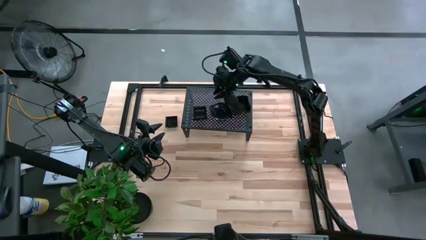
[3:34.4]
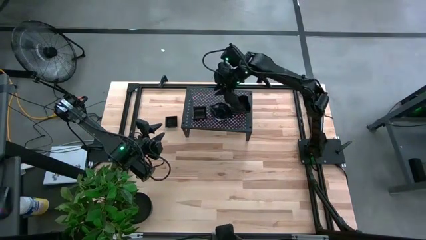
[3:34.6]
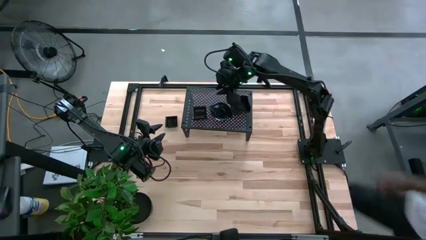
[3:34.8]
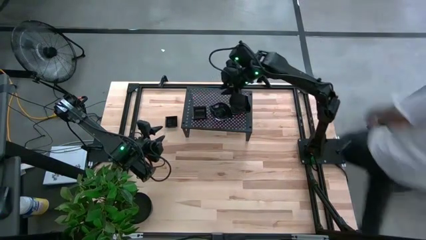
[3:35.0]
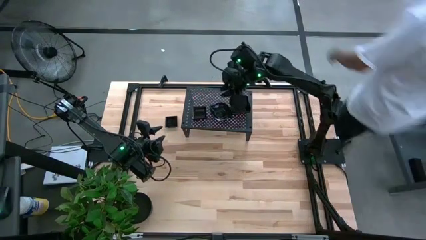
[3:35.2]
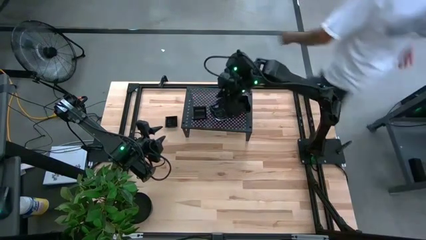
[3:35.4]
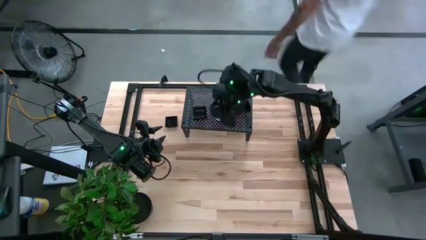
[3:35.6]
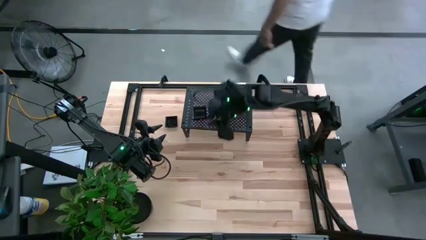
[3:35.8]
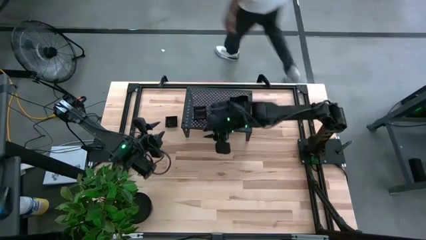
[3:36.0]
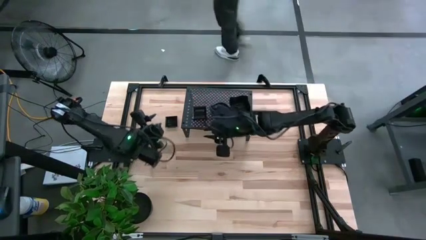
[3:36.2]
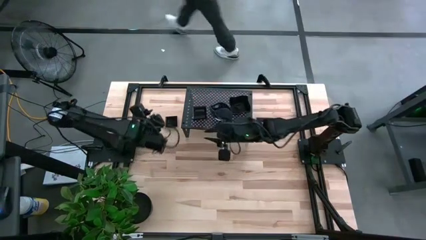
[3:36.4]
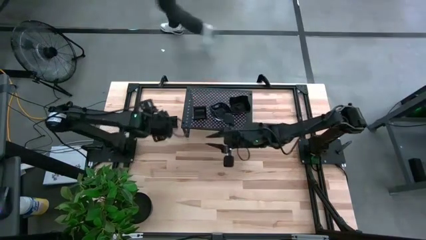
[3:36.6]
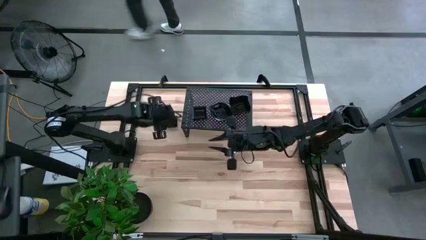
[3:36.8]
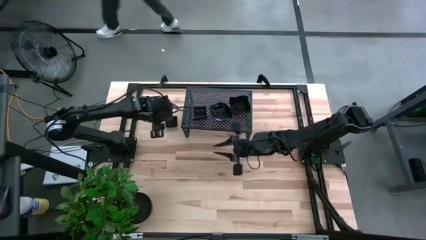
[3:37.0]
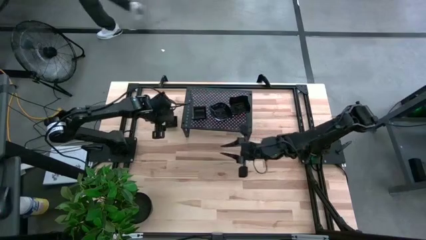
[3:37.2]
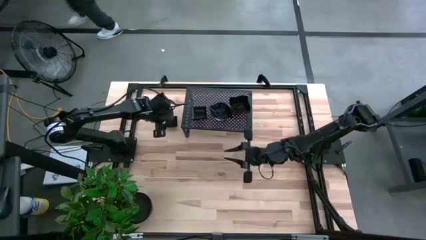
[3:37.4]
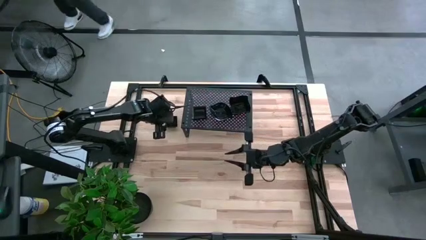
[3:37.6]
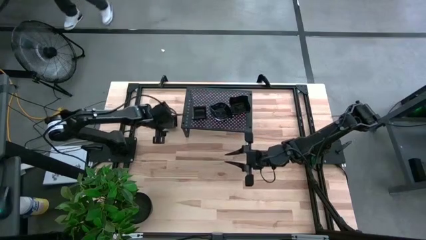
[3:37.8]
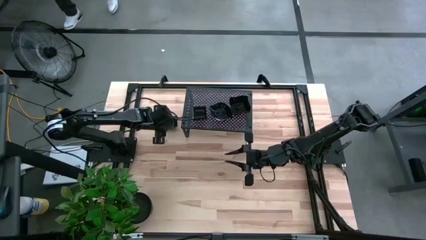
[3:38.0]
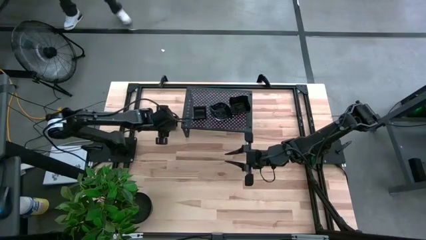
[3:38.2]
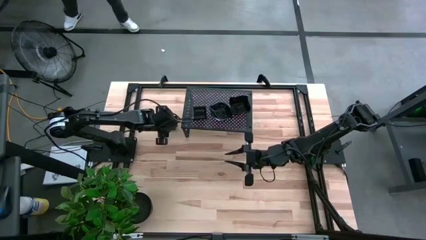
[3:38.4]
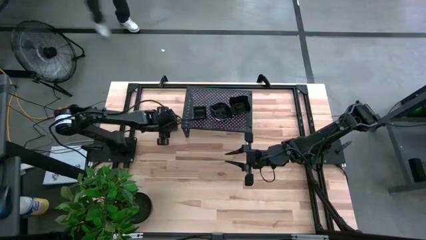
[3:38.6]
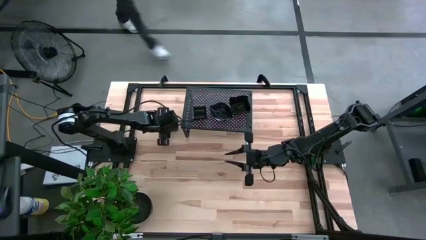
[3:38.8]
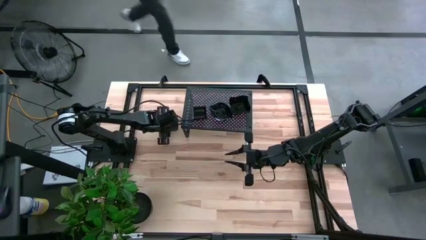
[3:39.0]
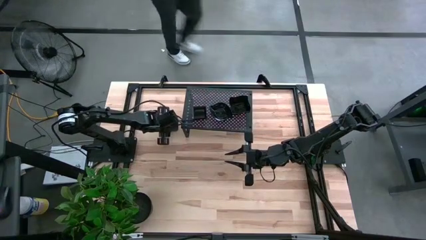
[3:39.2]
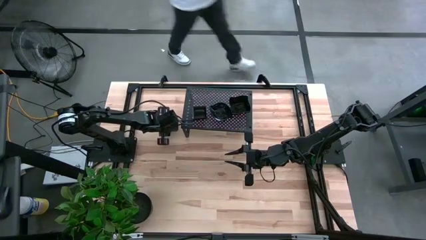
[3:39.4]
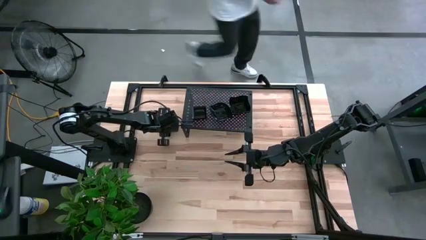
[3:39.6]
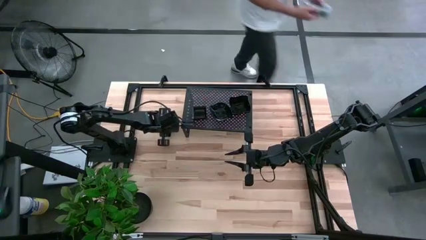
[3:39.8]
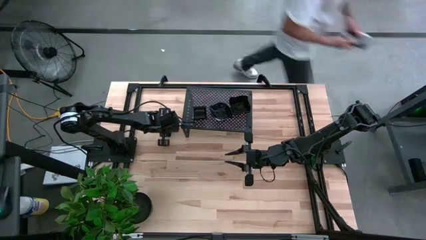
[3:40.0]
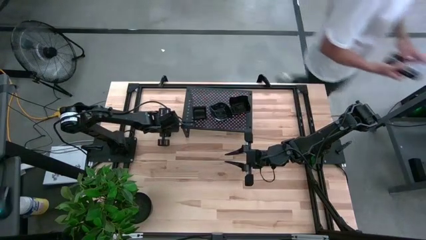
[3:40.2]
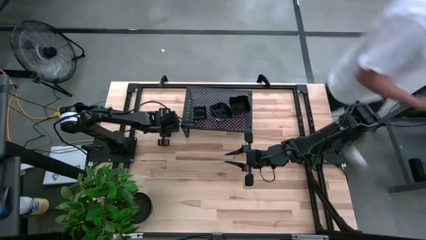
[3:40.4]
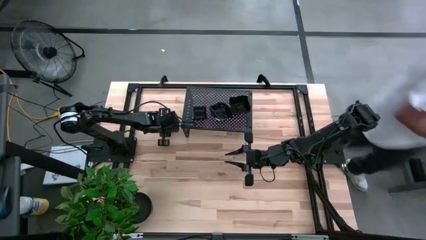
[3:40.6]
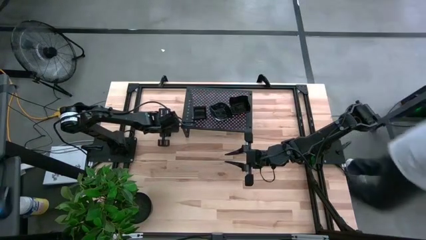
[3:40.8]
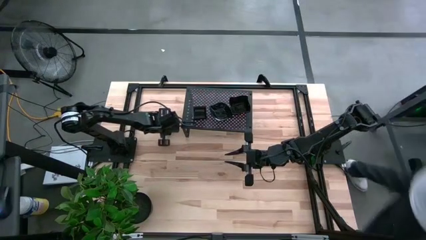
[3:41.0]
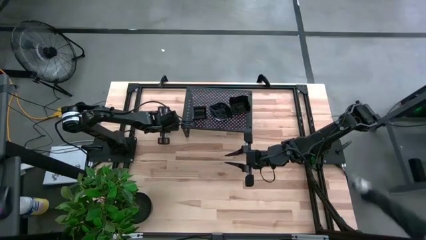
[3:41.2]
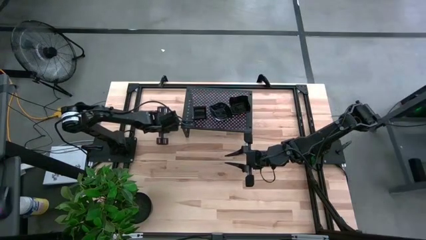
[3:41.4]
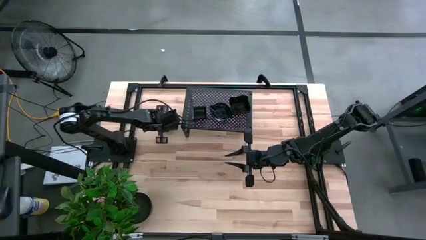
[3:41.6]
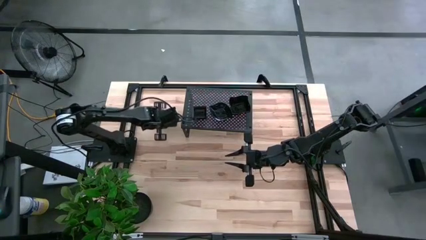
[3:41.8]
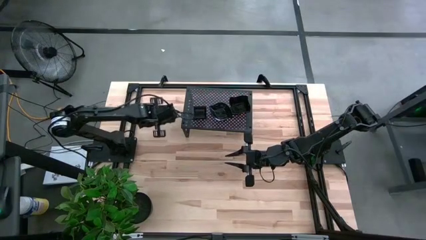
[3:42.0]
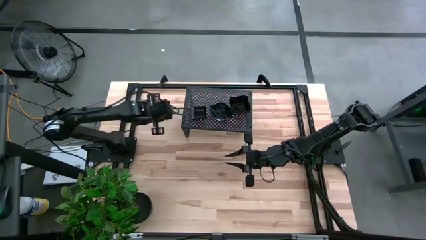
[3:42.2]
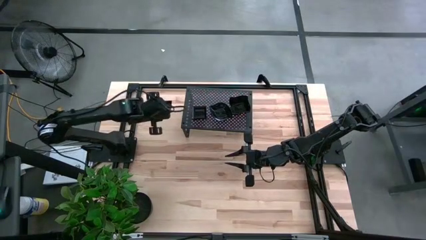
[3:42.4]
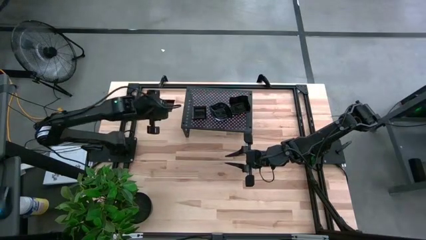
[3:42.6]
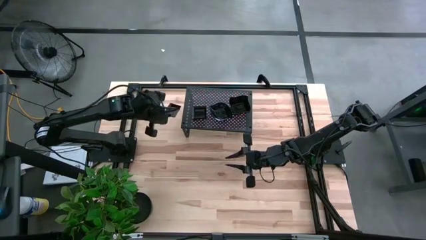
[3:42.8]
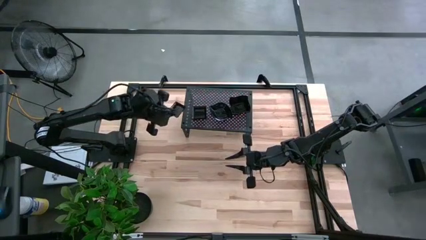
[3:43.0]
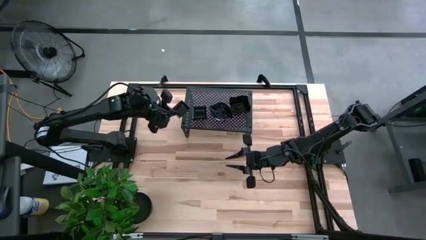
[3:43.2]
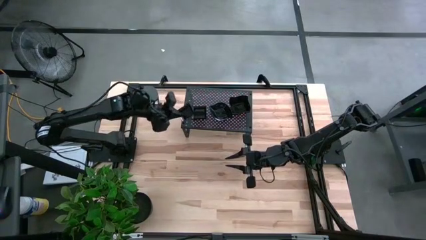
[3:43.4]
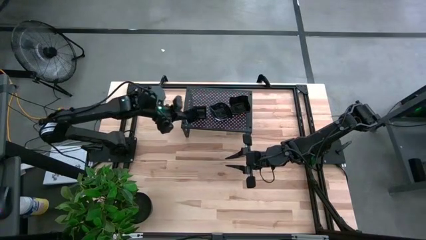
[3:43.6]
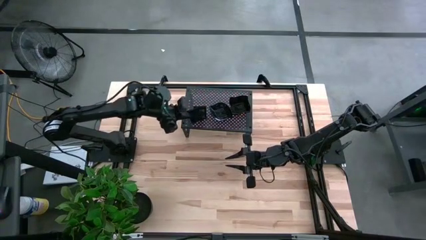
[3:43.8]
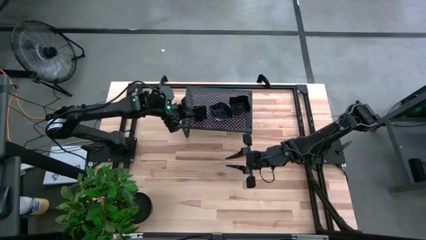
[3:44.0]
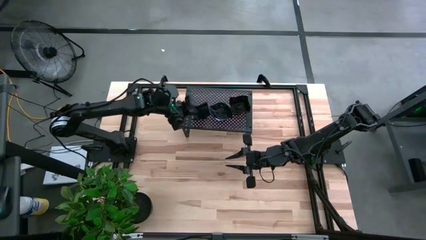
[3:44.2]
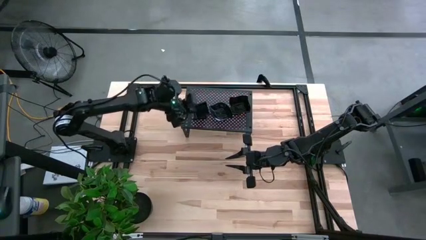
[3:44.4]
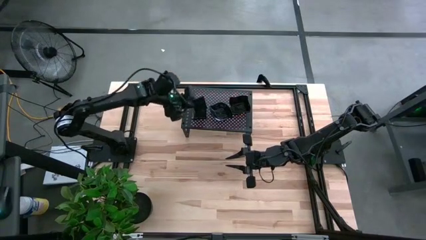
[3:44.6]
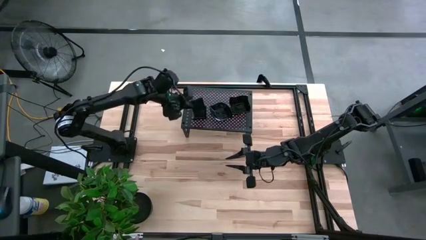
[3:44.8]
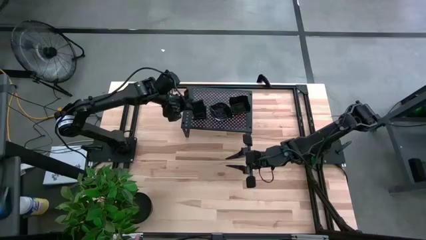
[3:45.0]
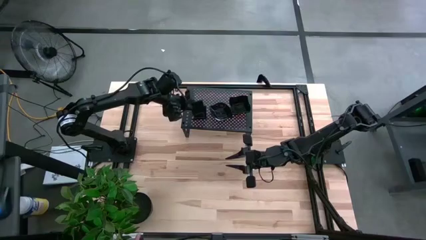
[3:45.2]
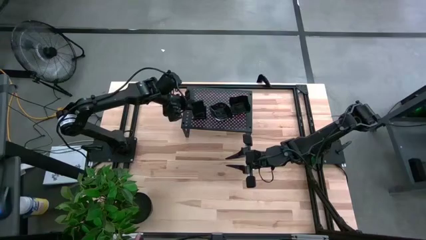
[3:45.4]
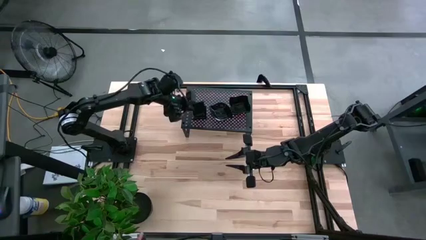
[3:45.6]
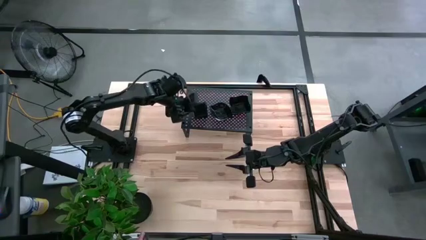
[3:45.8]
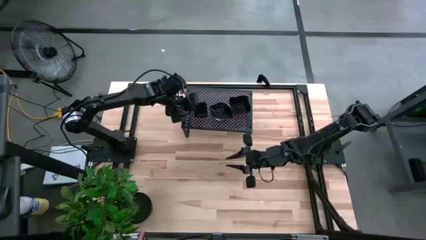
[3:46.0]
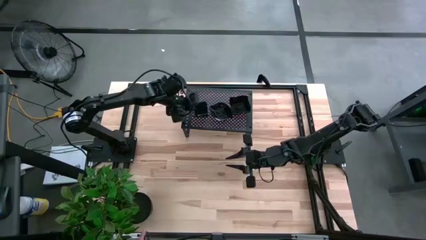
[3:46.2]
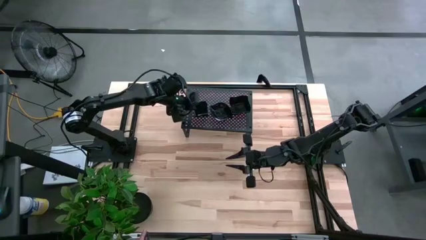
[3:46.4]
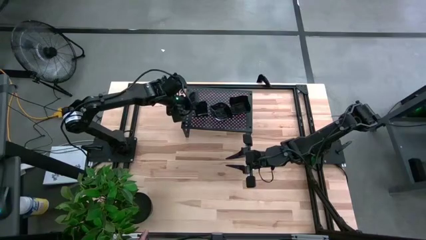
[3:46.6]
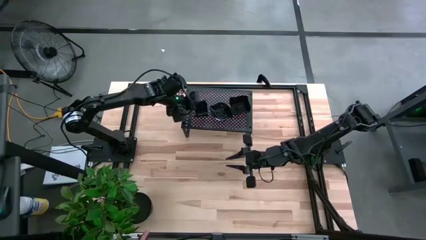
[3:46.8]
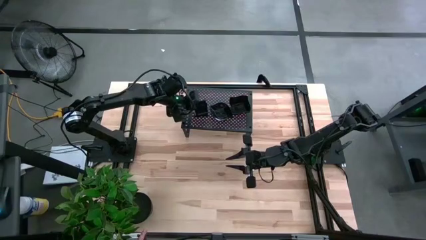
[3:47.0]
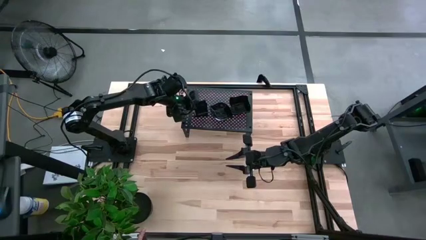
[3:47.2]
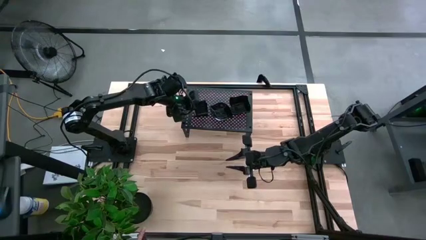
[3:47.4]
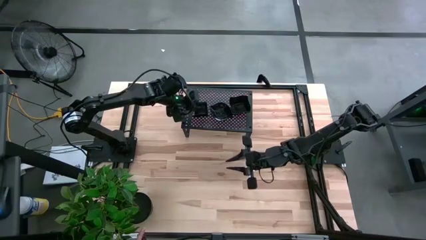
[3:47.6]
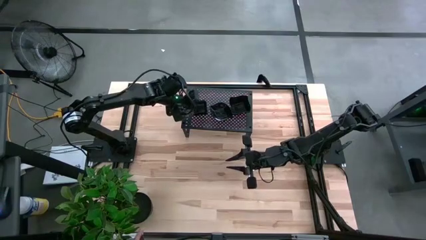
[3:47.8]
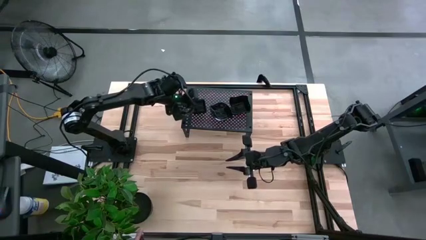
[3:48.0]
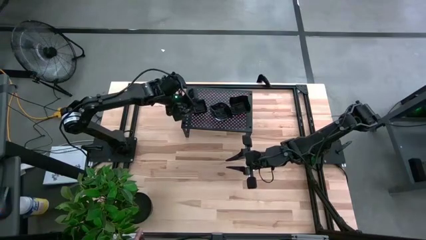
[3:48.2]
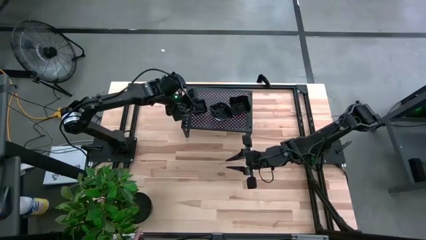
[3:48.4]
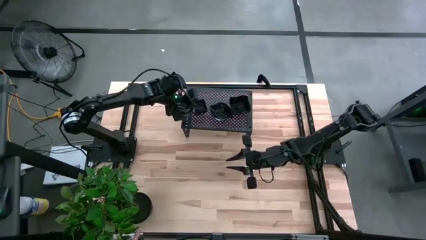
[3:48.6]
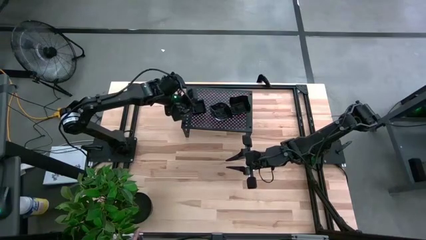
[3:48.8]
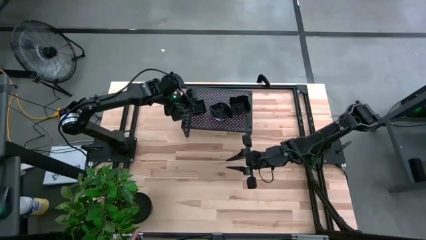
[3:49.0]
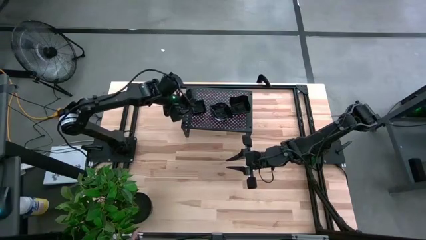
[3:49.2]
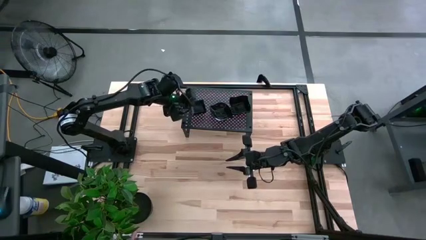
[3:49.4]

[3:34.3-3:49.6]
Task: Pick & Place Mini shaped plates
Stack the square plate on the square plates on the shelf

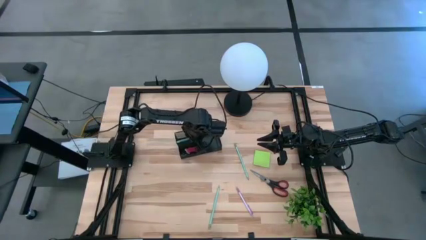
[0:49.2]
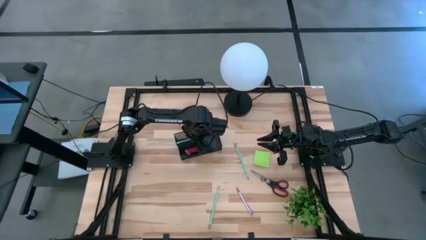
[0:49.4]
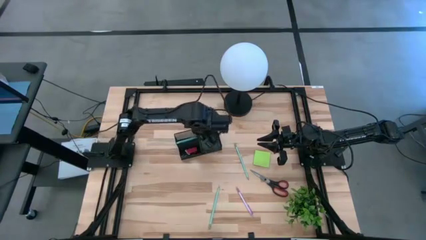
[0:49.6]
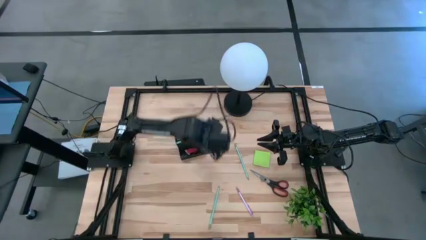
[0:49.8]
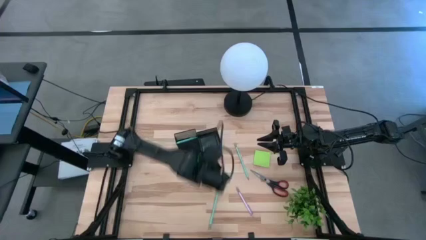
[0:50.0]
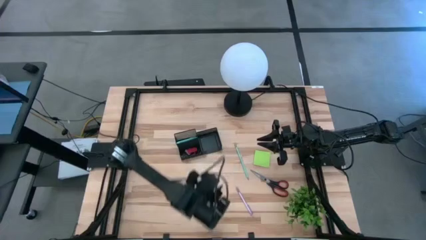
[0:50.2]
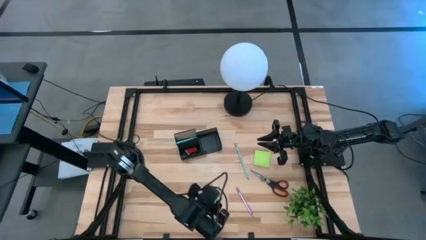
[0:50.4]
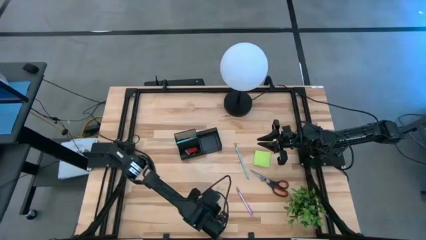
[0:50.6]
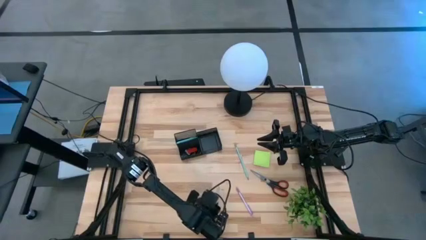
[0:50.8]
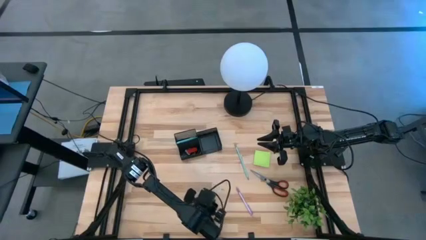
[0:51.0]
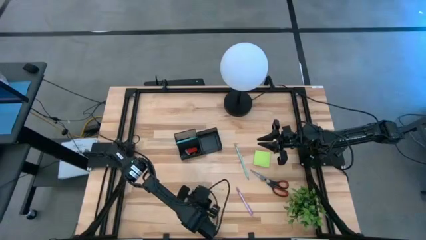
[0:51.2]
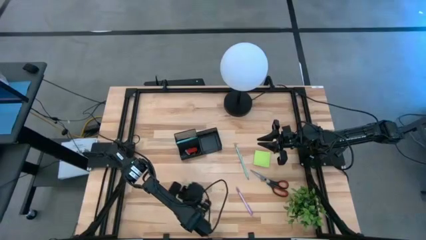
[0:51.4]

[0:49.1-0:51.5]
Task: Pick and place office supplies into organizer
Adjust the left blue pencil
